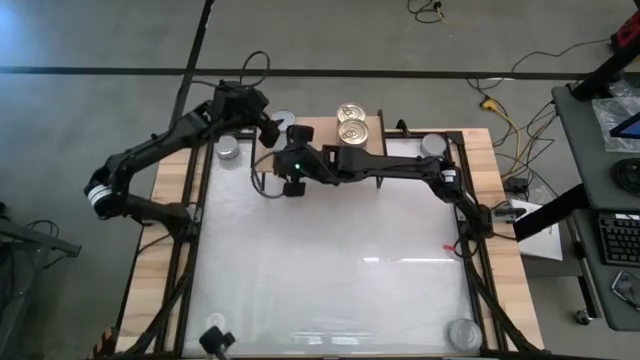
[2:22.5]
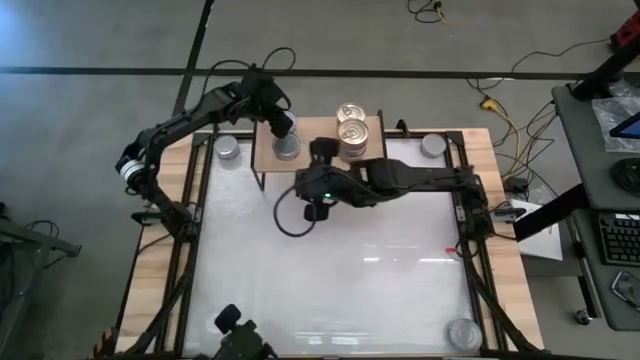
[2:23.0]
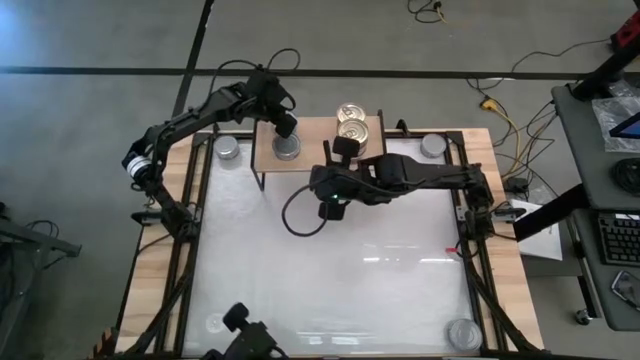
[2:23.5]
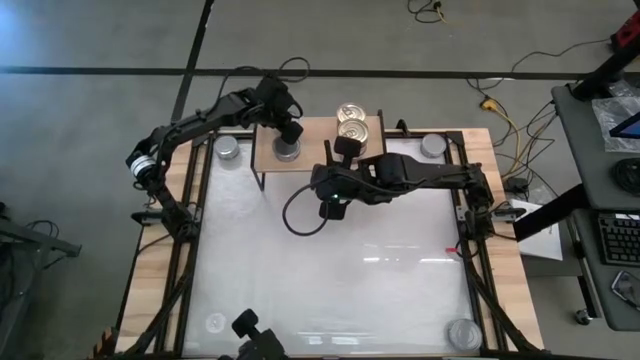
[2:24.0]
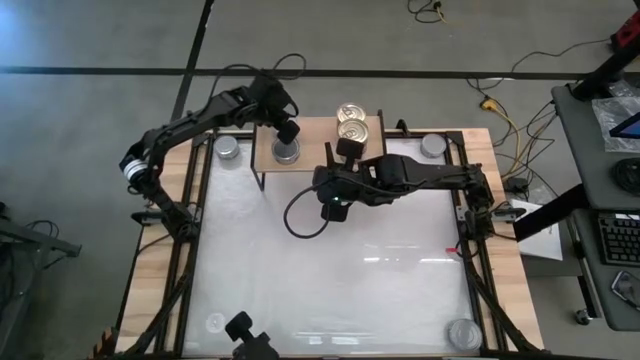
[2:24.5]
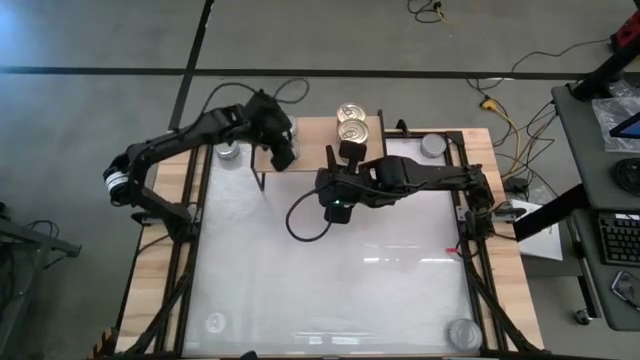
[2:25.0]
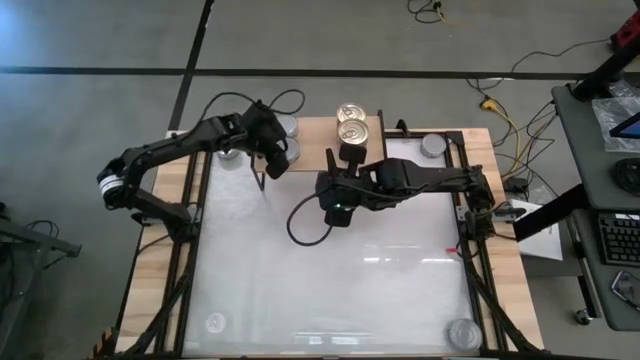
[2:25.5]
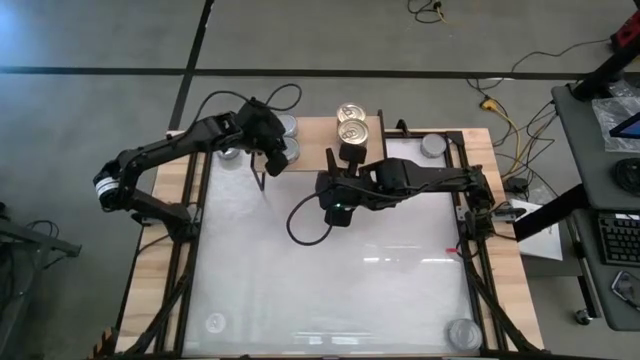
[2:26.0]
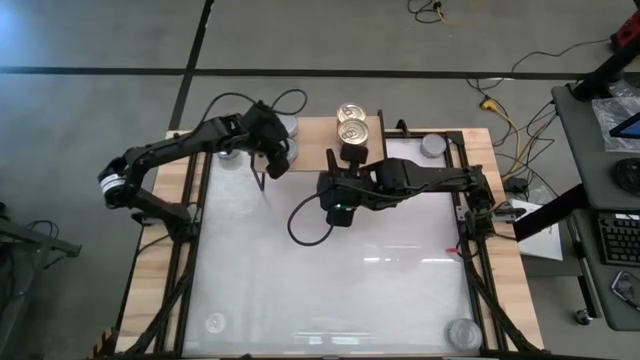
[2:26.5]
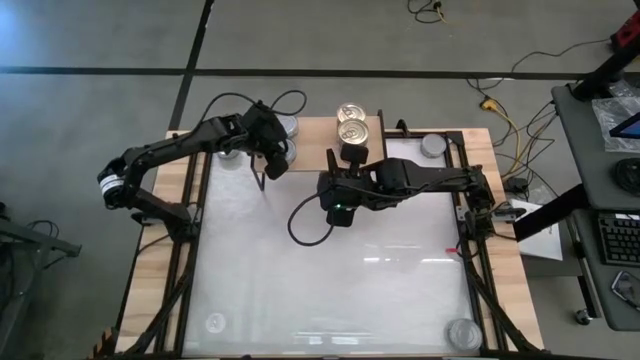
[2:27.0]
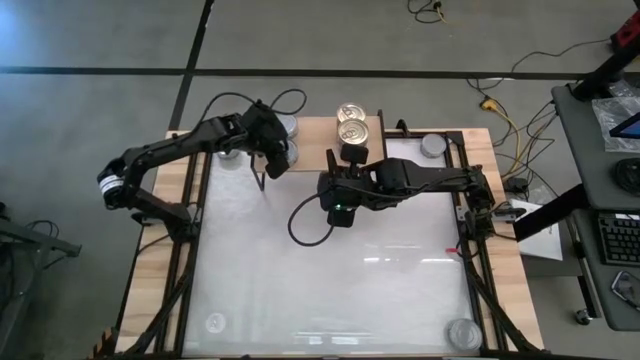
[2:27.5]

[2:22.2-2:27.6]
Task: Stack canned seafood by type on shelf
Adjust the green tuna cans on the shelf

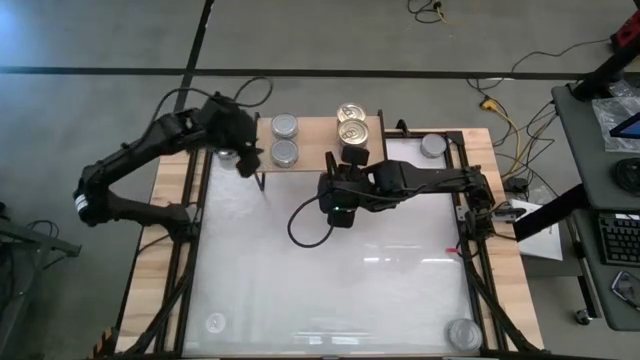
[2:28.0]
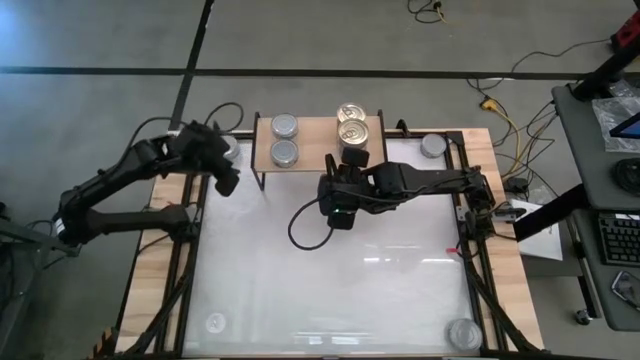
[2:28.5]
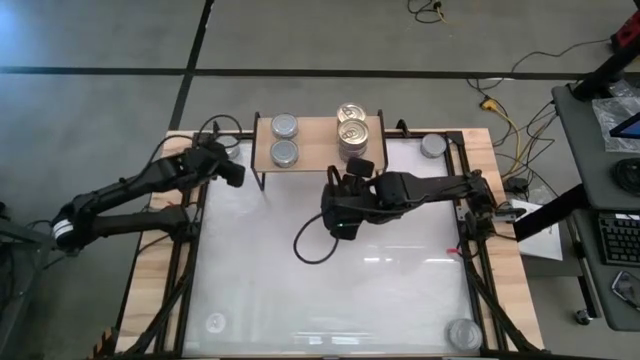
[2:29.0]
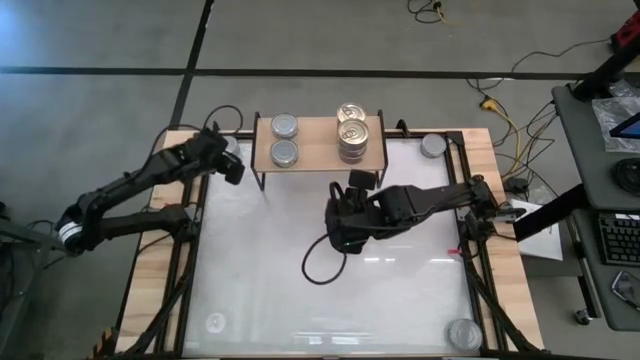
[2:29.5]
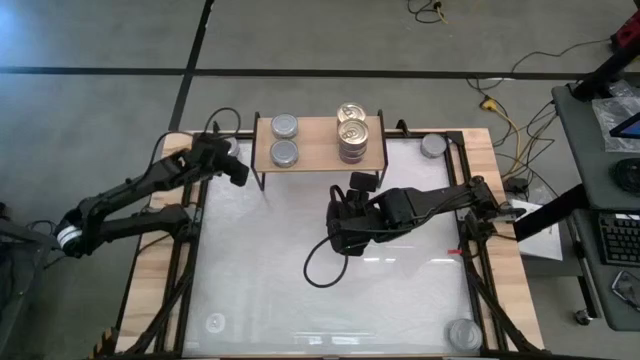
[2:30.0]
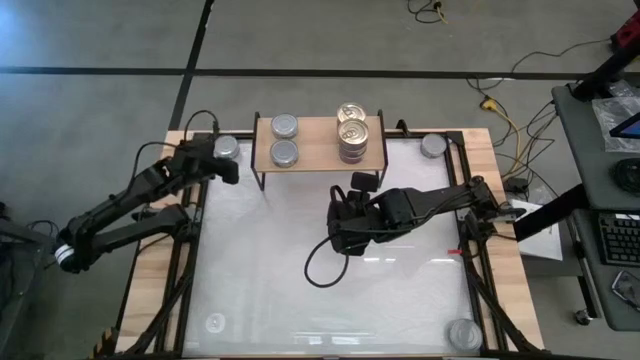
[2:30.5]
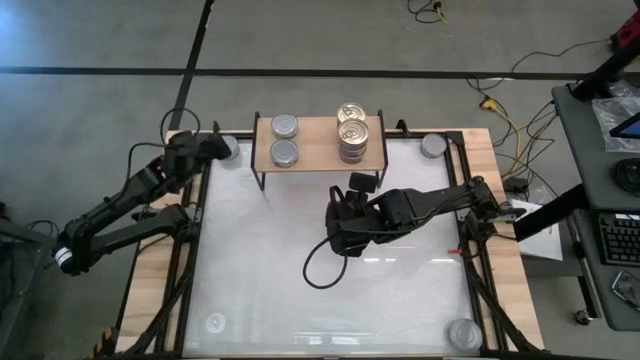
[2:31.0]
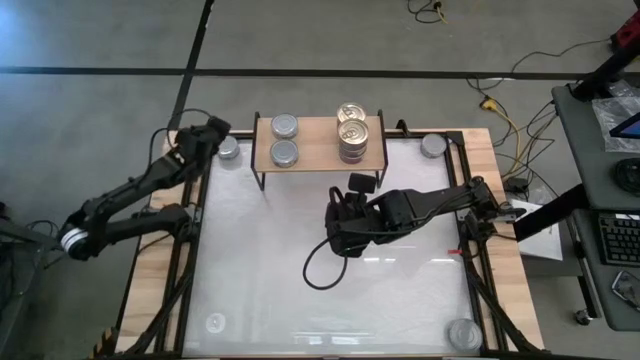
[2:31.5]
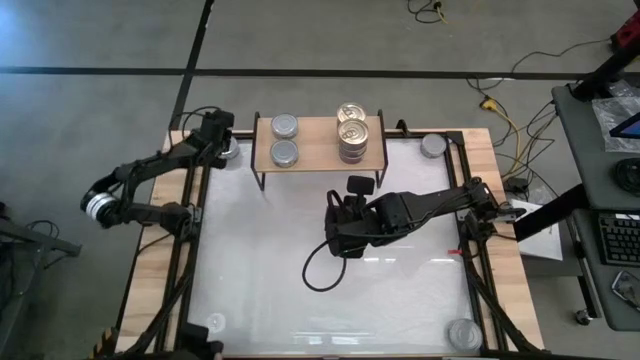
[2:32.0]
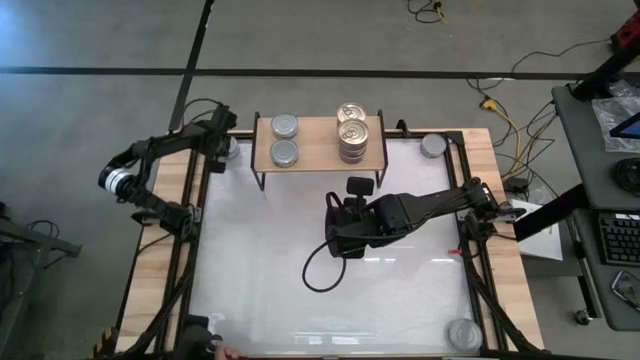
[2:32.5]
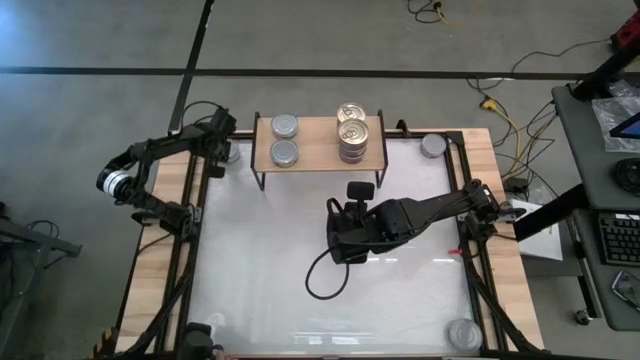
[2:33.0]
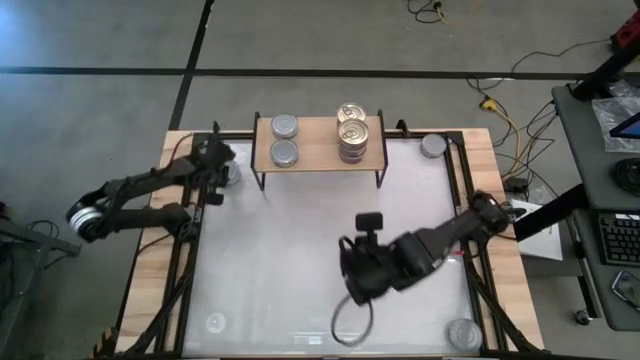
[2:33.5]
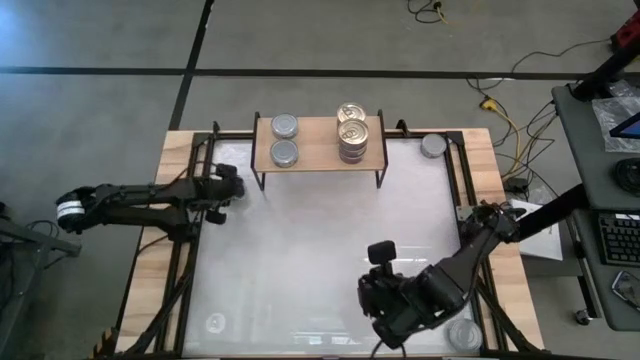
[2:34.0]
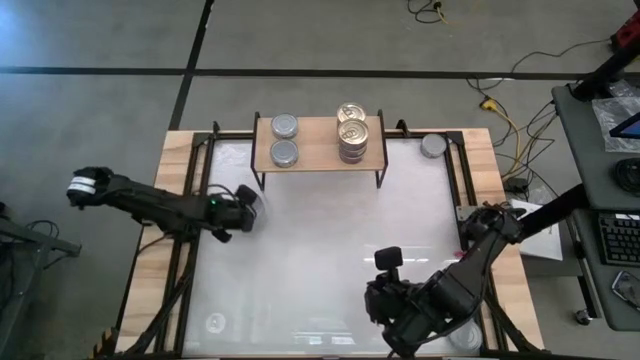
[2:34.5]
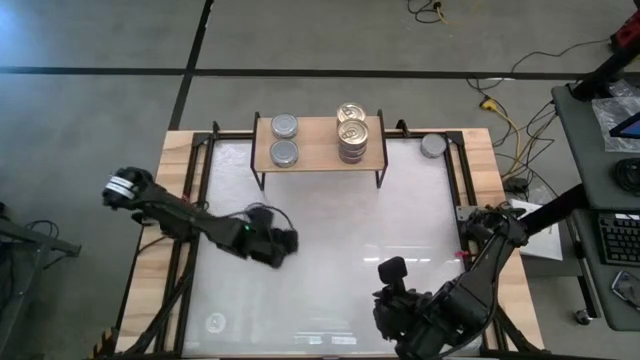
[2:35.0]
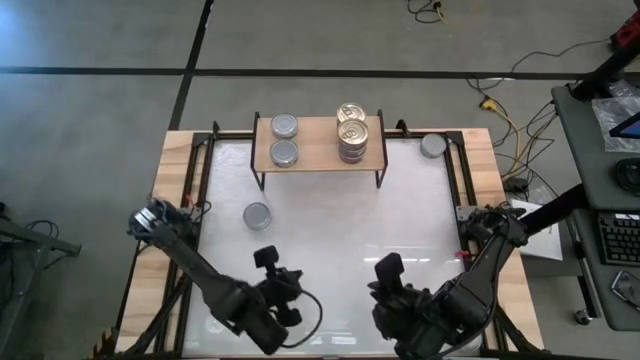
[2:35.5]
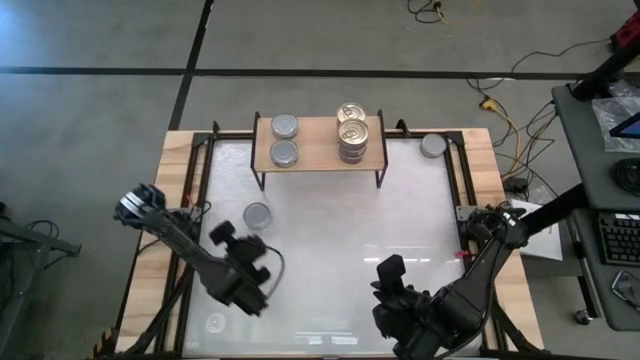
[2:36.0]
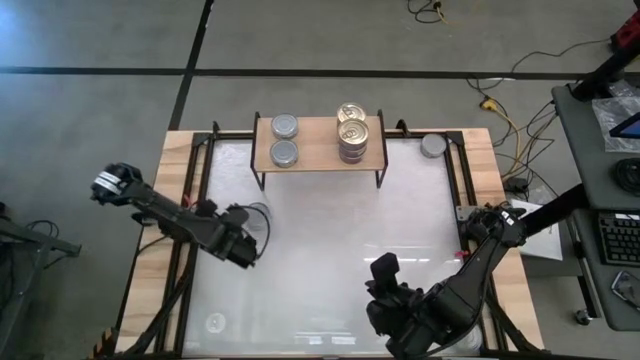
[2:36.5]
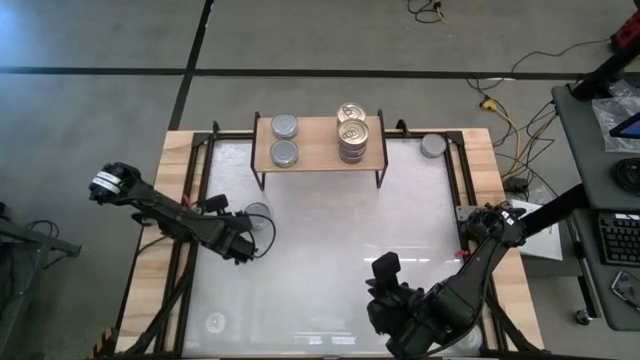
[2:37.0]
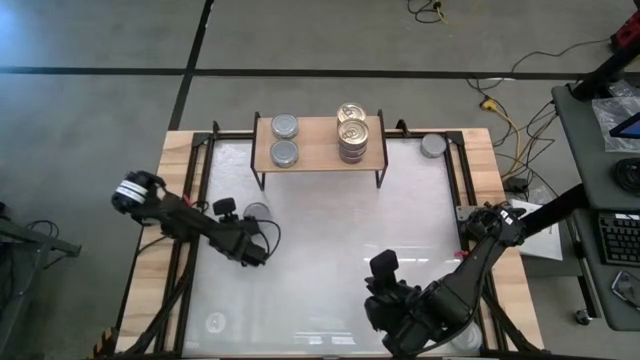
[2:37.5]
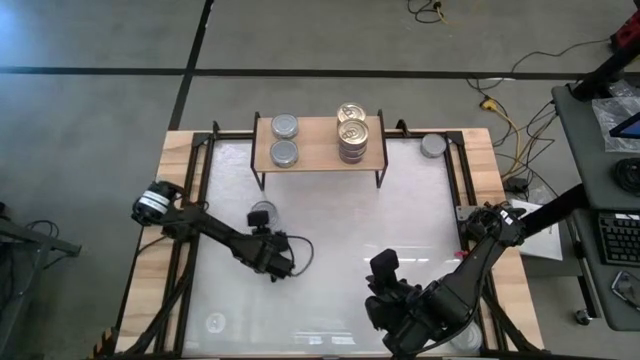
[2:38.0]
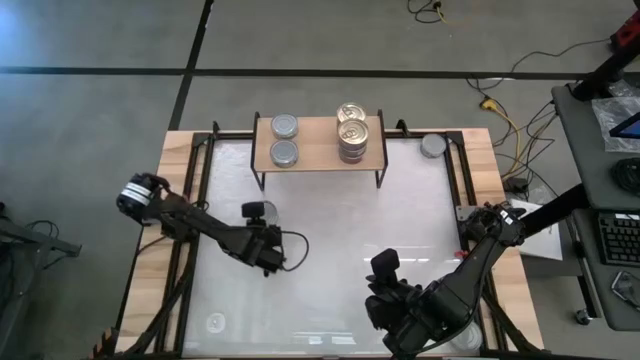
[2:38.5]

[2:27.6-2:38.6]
Stack the green tuna can on top of the other green tuna can on the shelf

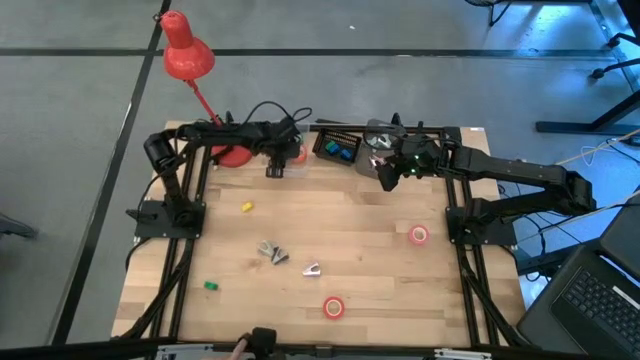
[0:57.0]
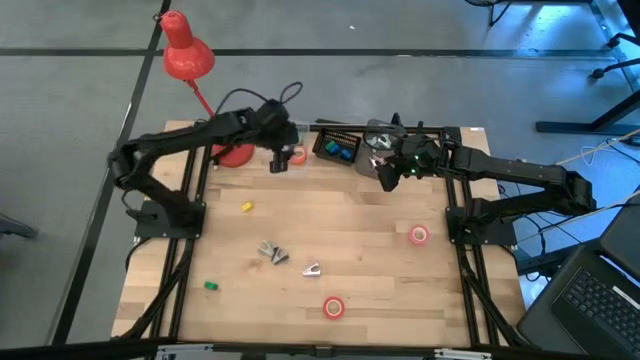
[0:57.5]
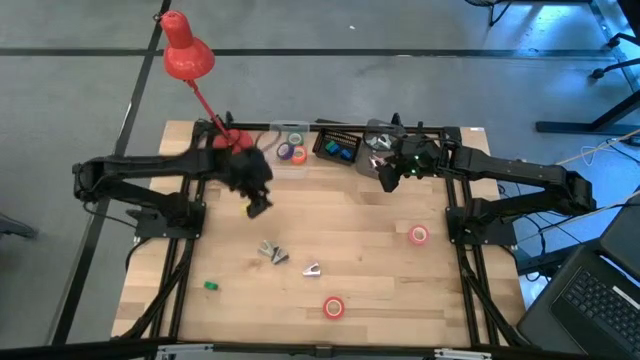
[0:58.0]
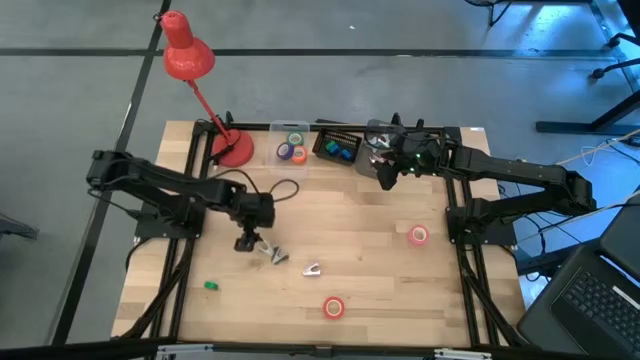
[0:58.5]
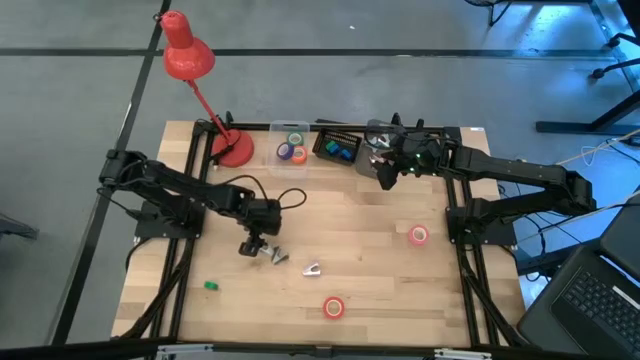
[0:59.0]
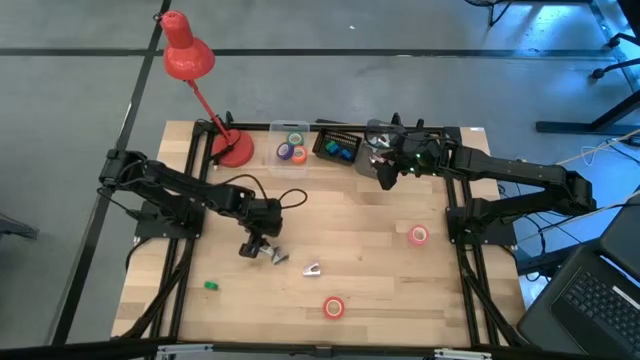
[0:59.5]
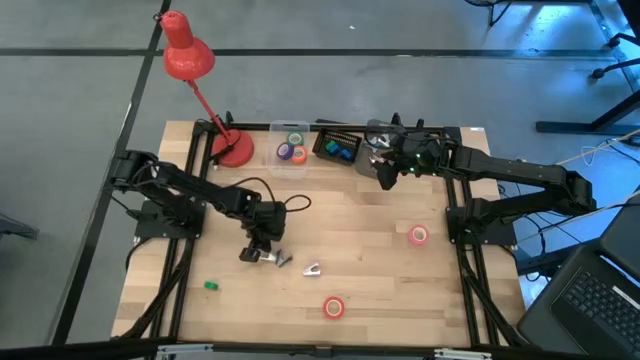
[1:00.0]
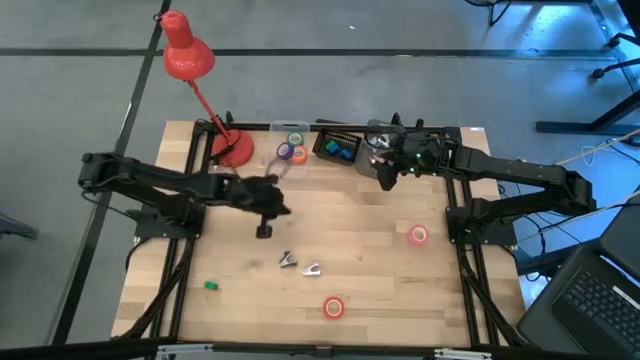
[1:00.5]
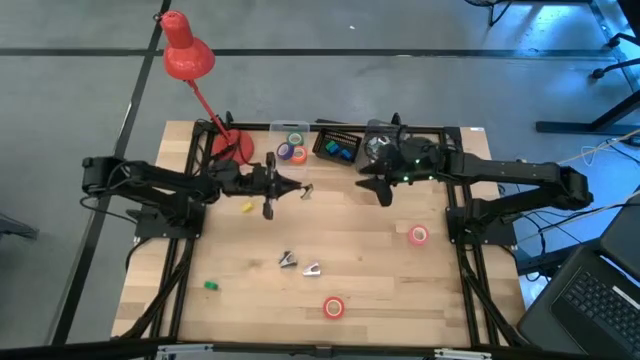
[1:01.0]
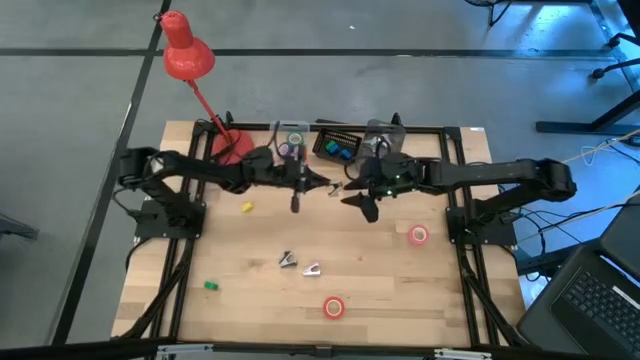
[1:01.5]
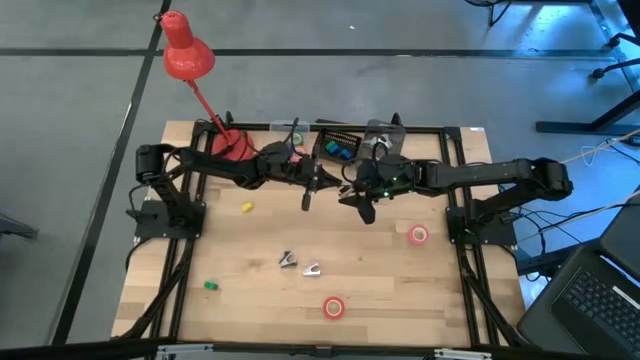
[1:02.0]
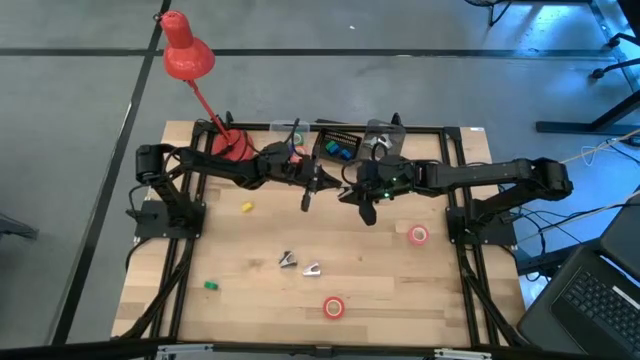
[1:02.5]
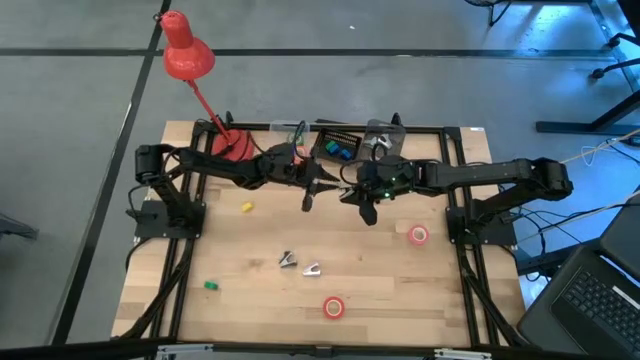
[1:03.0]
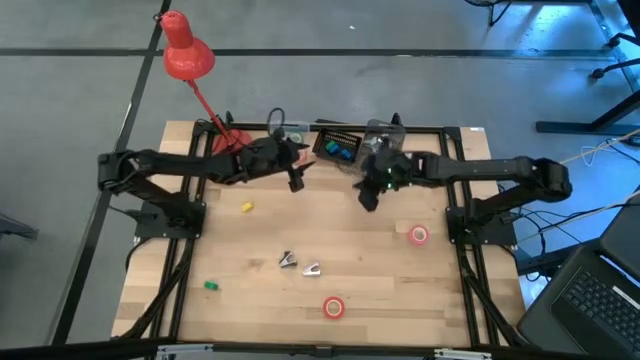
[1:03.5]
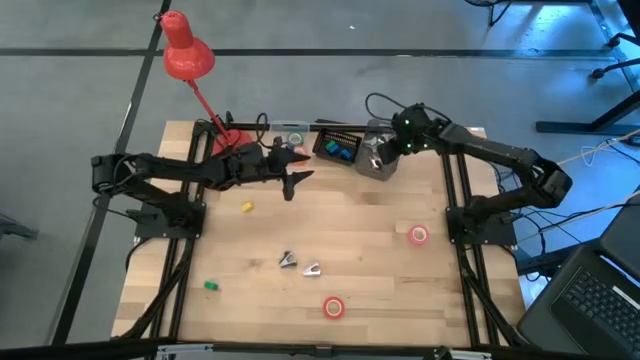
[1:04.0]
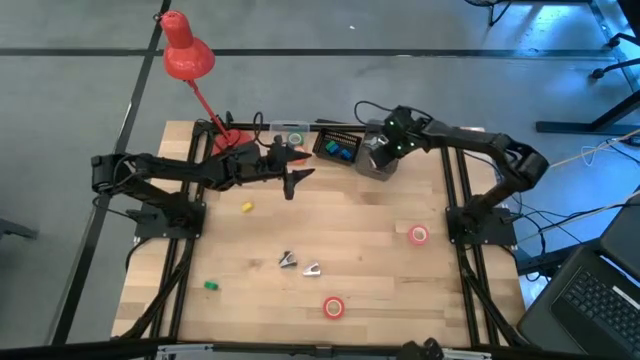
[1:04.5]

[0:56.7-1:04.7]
Task: Pick and place Stapler, Stapler remover, tape
Put the gray staple remover into the left black bin
